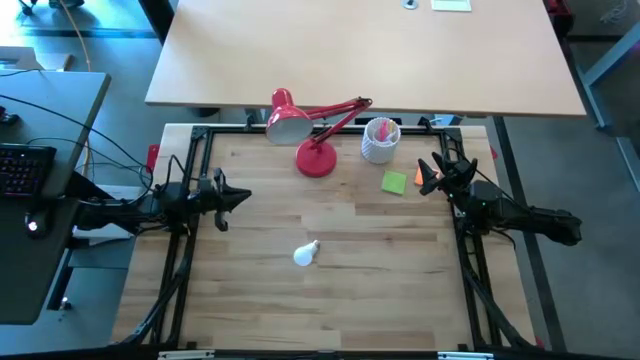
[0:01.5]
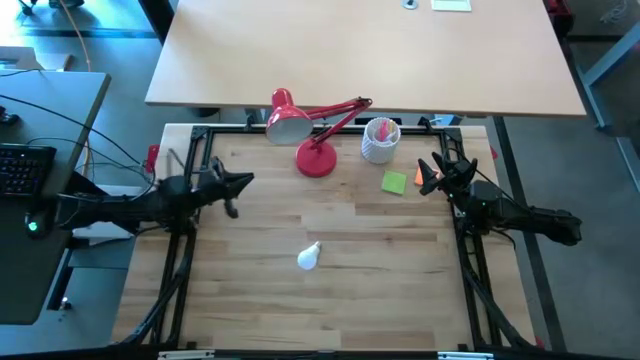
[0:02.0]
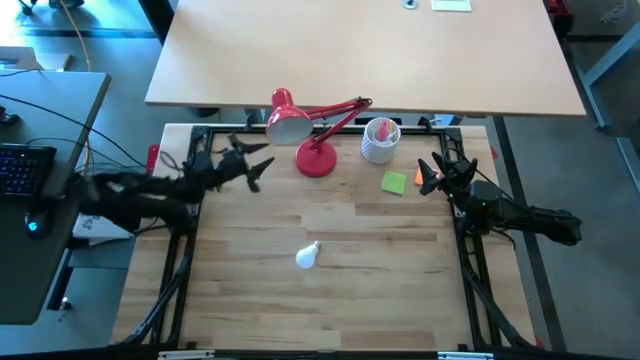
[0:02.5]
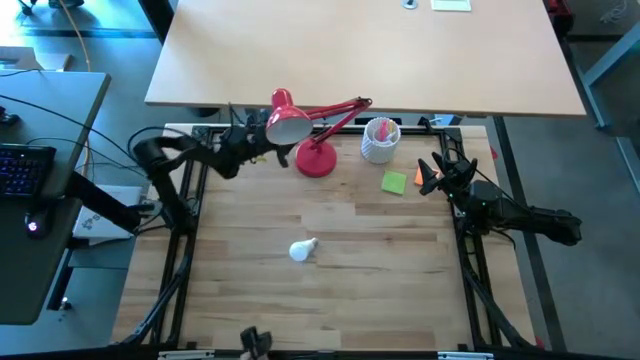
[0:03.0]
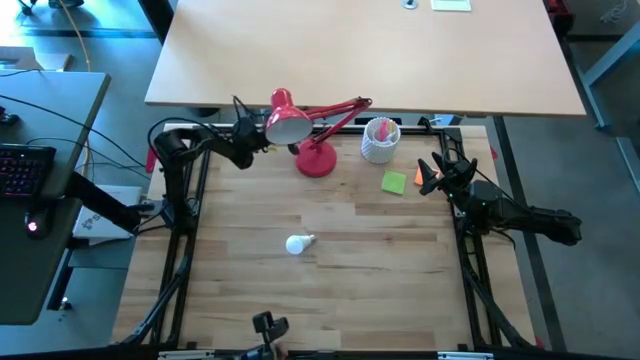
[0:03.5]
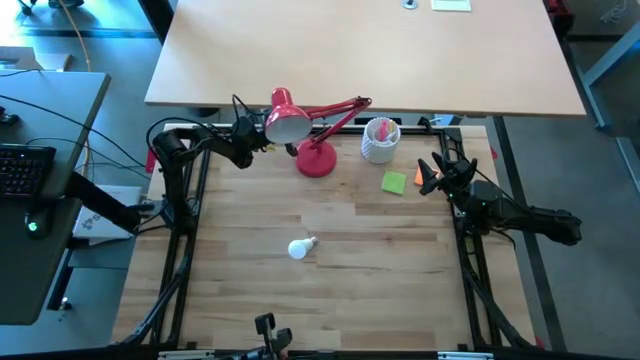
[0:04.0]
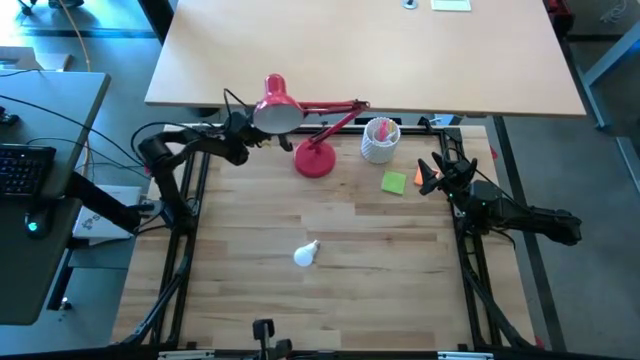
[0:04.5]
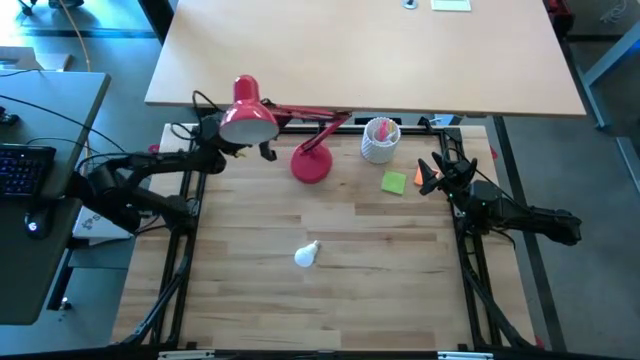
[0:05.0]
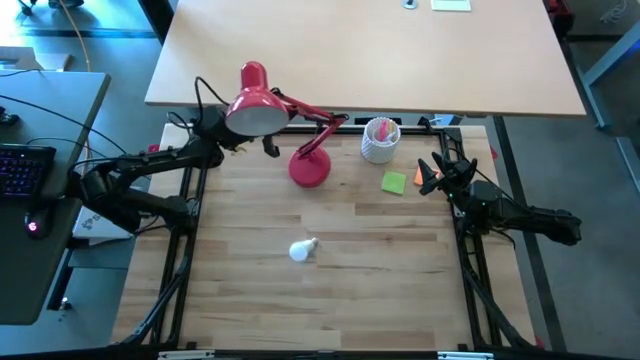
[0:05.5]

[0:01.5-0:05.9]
Task: Screw lightbulb
Adjust the red lamp

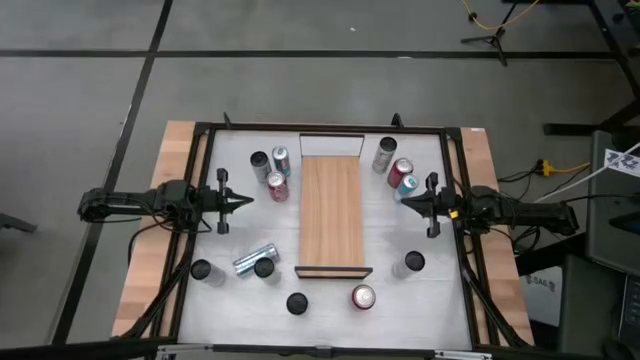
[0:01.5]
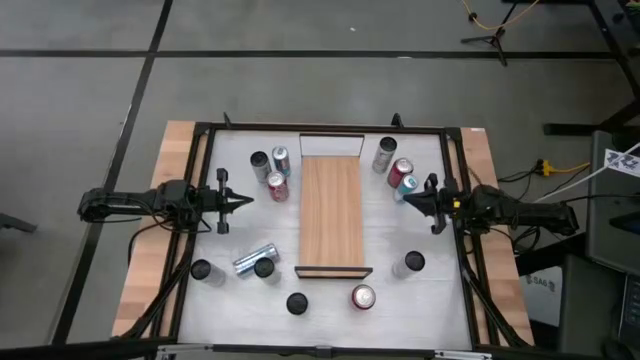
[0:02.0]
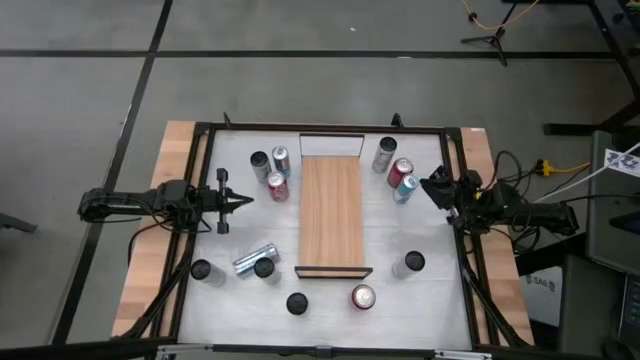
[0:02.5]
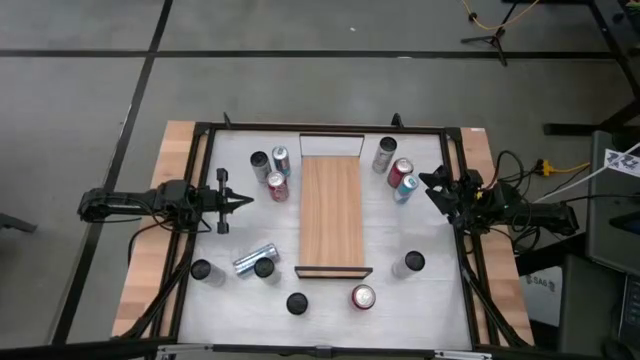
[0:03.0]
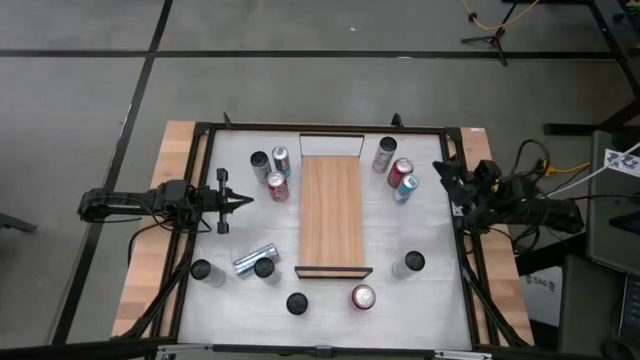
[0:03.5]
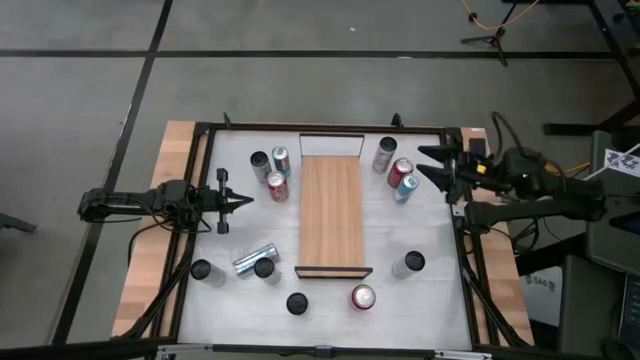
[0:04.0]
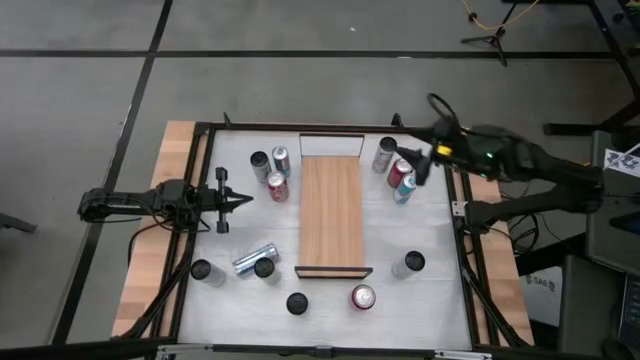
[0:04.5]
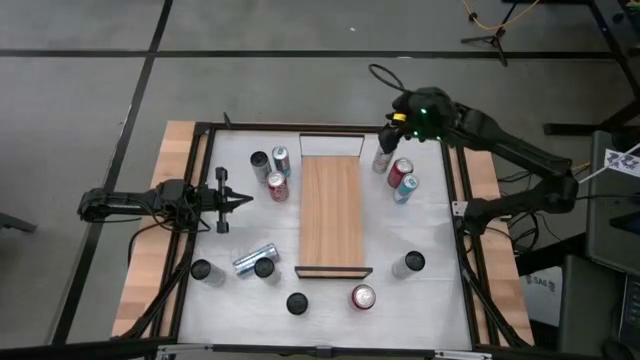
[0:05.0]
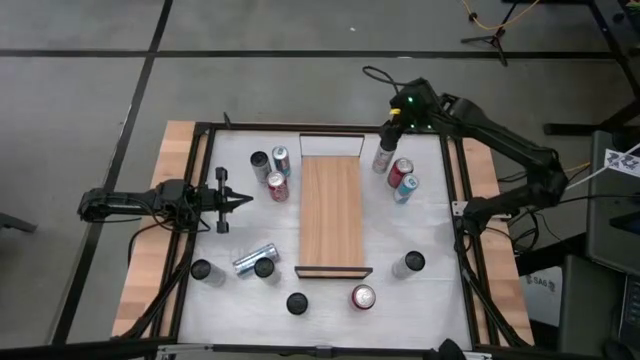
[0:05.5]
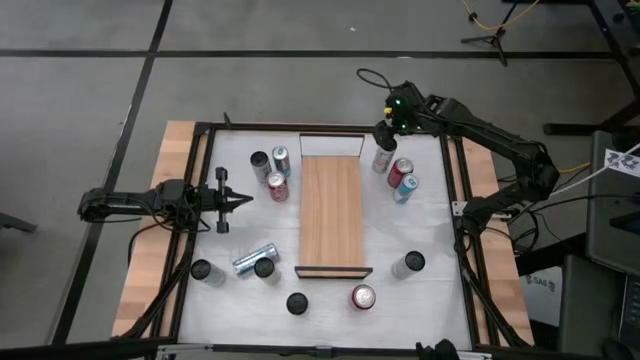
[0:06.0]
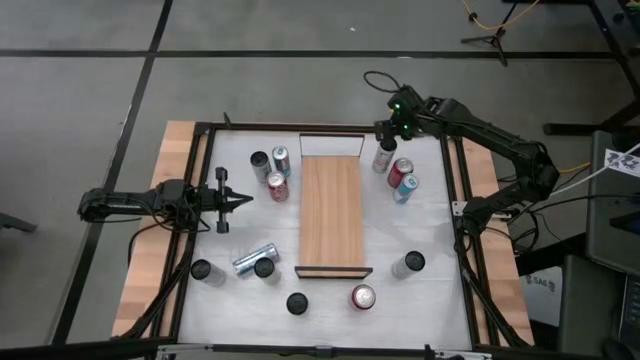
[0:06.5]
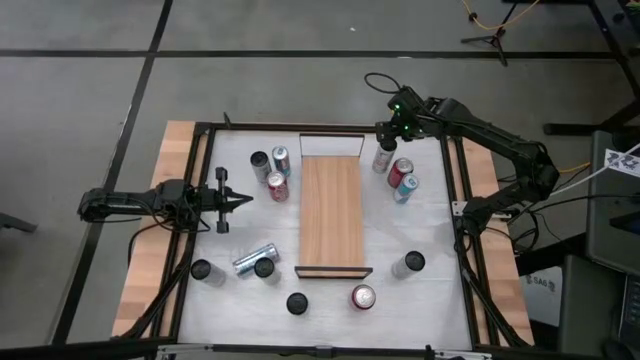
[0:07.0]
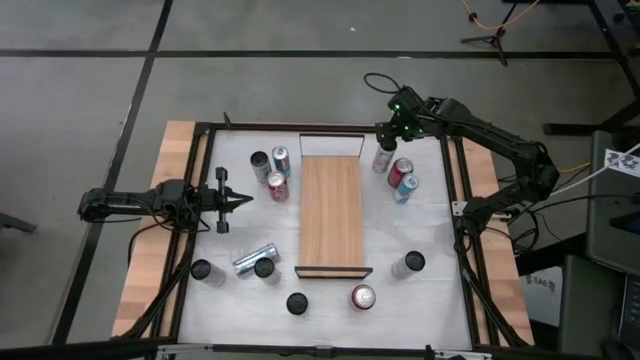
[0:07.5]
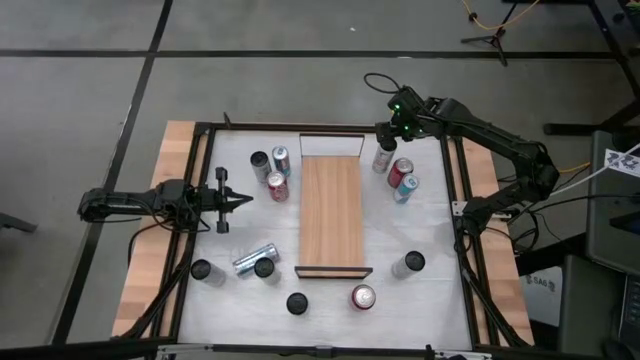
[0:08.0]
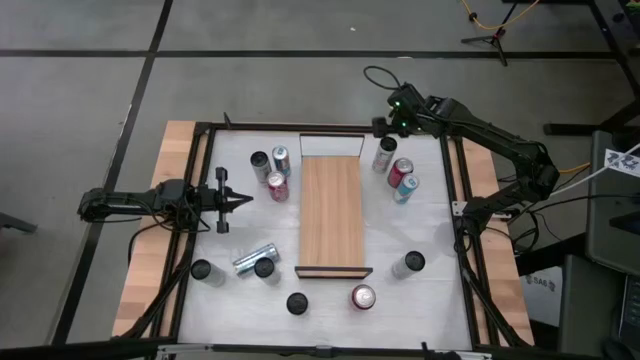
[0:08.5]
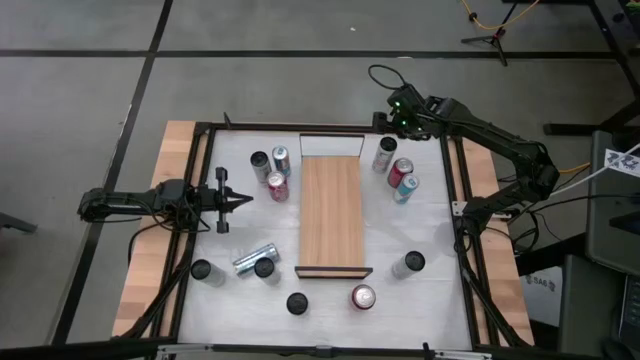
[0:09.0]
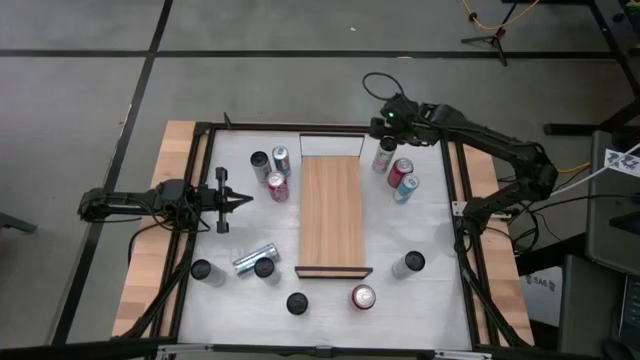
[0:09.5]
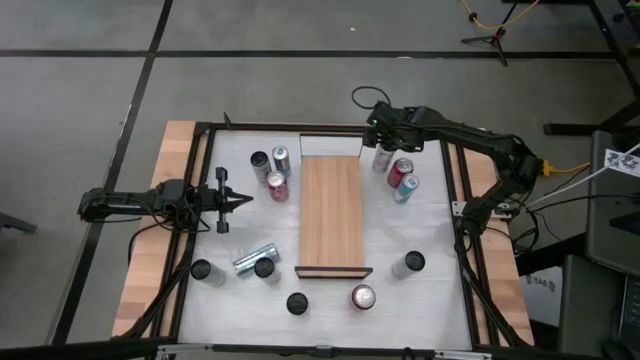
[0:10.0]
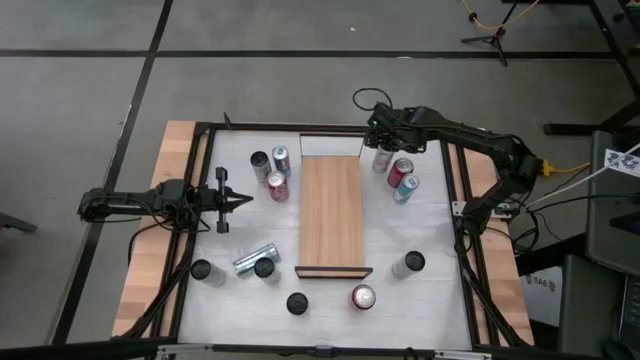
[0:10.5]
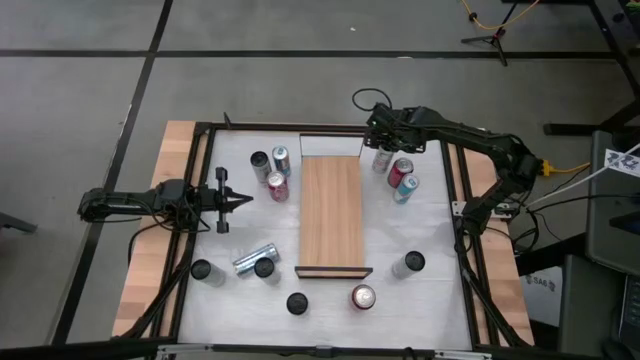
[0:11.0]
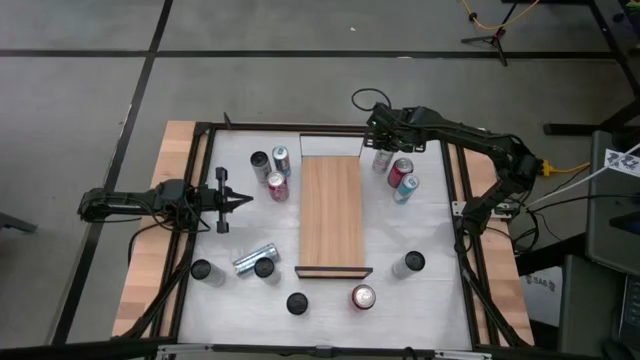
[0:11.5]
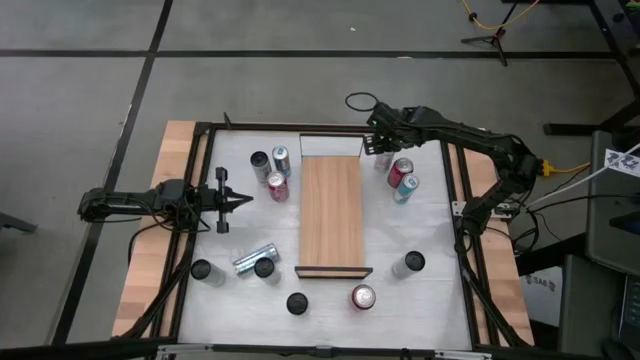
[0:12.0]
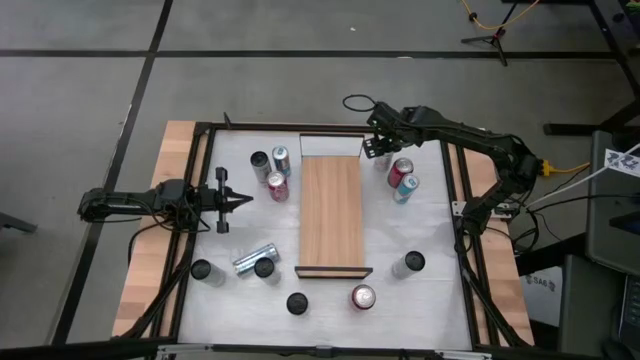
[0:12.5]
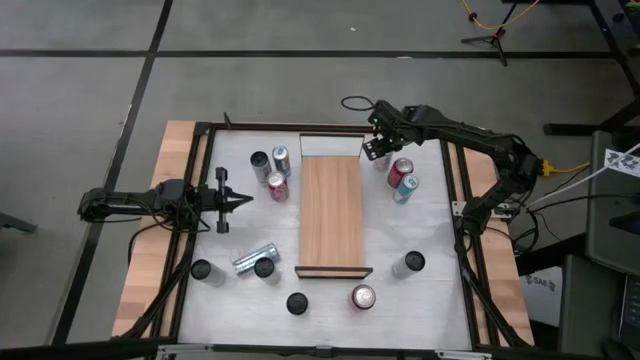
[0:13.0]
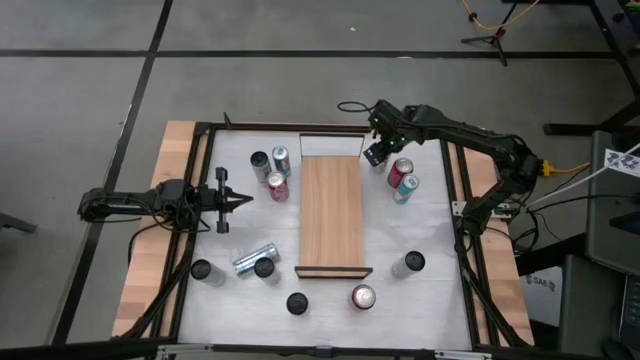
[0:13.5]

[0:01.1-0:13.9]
Task: Place canned beverage on shelf
Put the white pink soda can on the shelf
